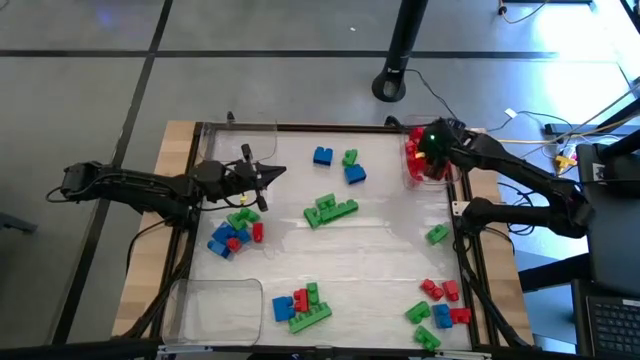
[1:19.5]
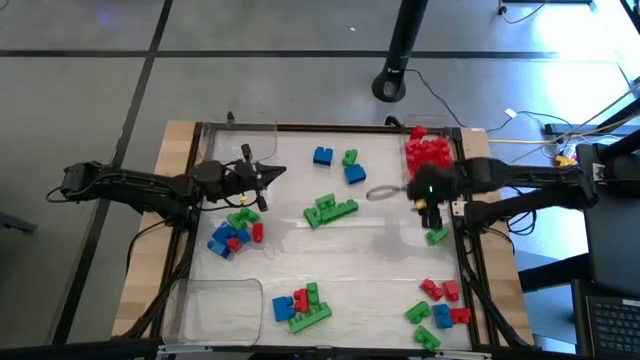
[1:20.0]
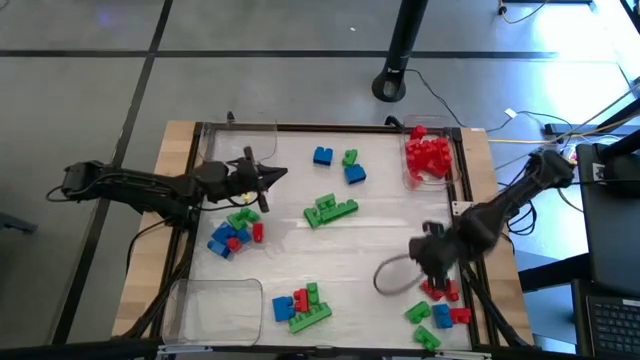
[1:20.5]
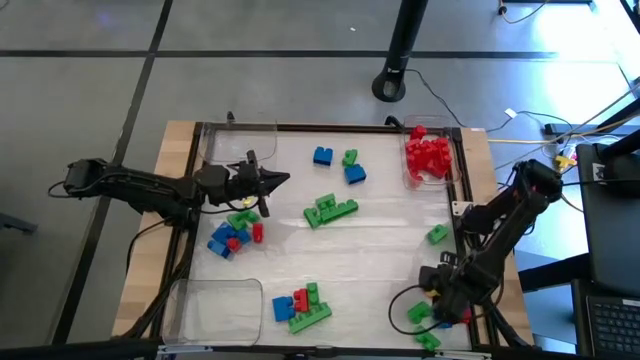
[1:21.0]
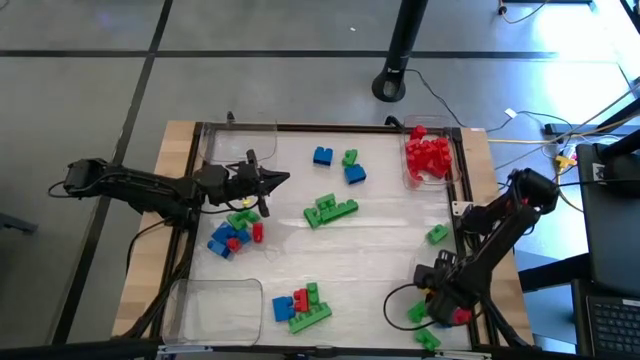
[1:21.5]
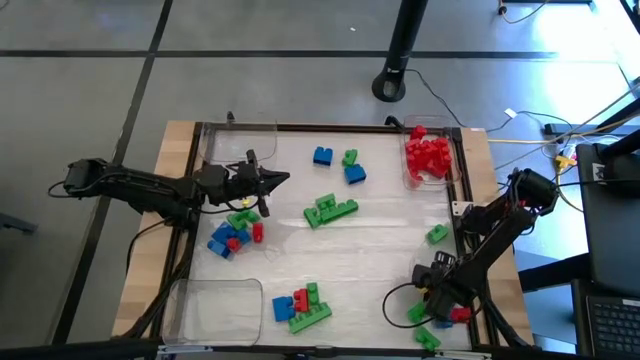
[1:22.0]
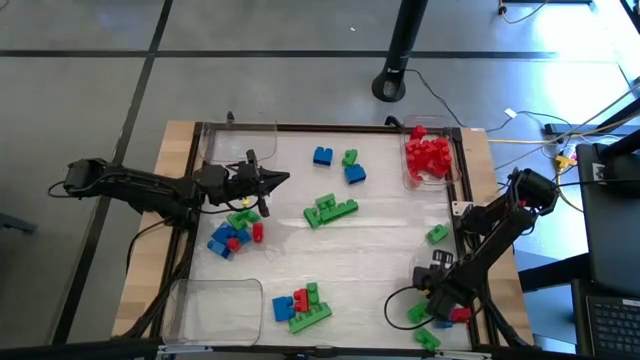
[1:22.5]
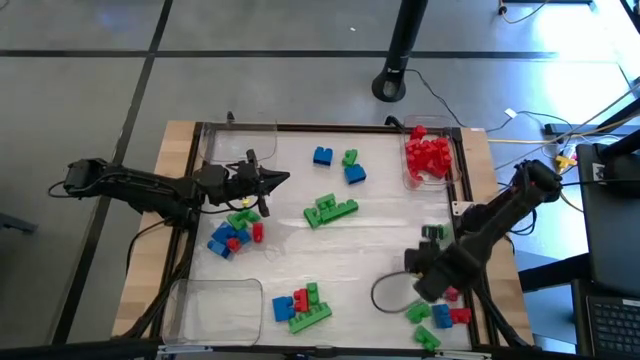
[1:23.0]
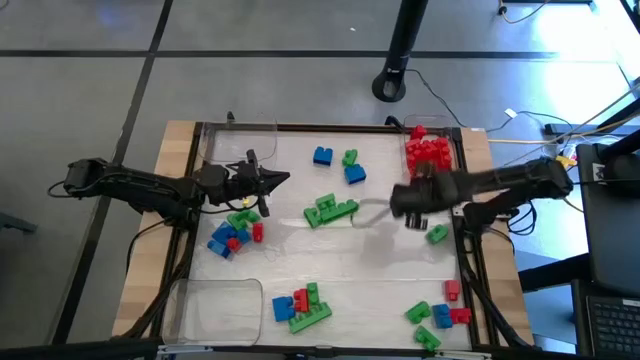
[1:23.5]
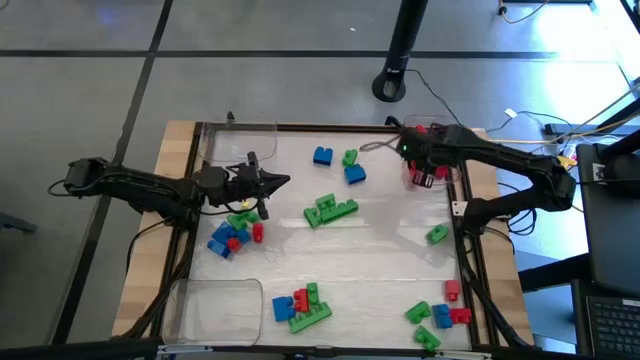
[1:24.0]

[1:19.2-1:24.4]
Task: Sort blocks
Put the red game piece into the right transparent bin

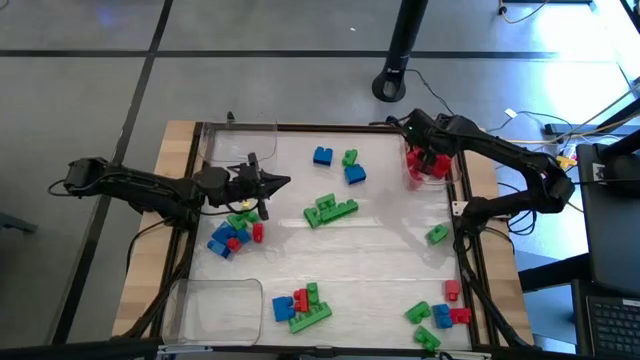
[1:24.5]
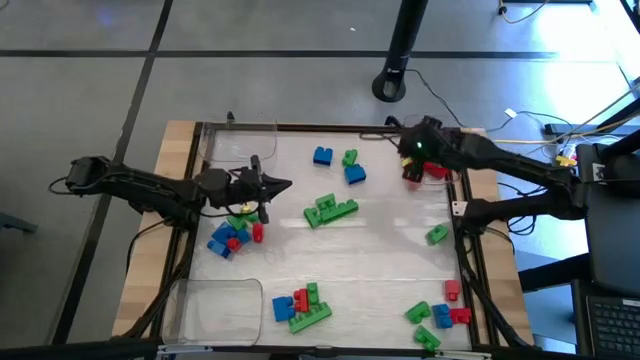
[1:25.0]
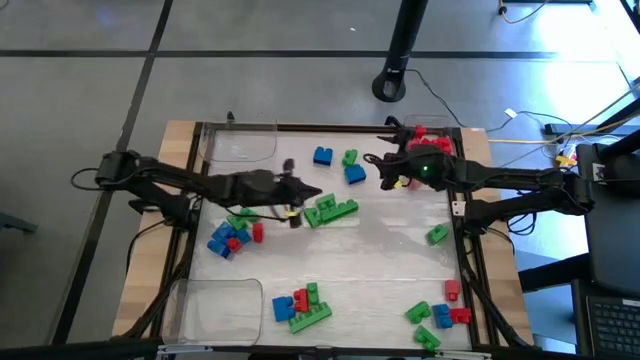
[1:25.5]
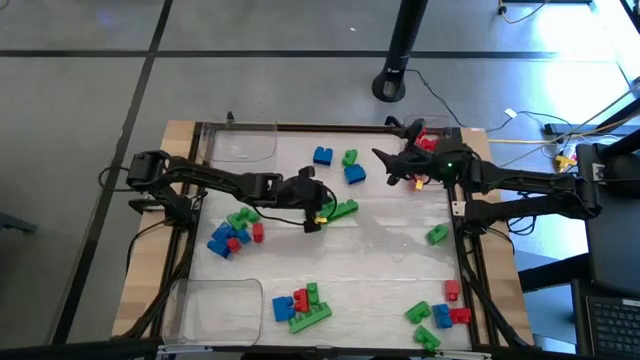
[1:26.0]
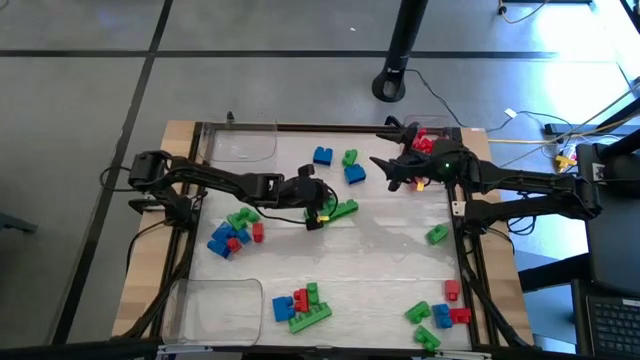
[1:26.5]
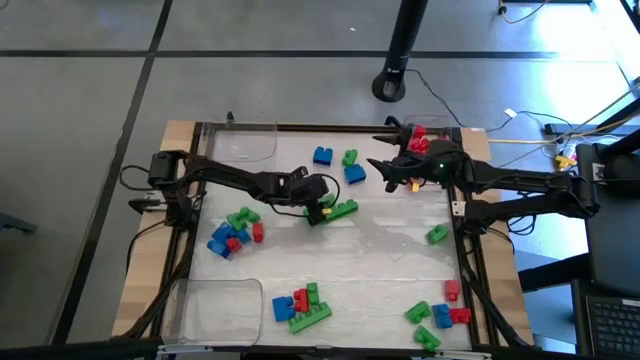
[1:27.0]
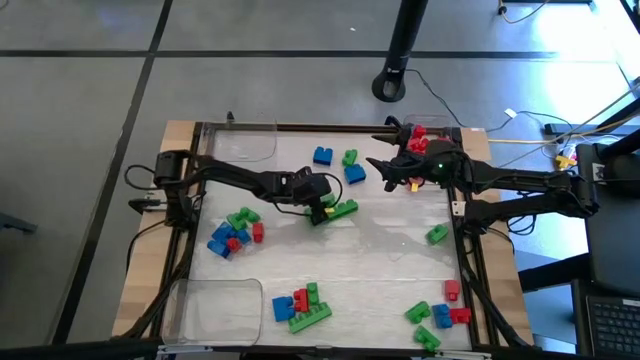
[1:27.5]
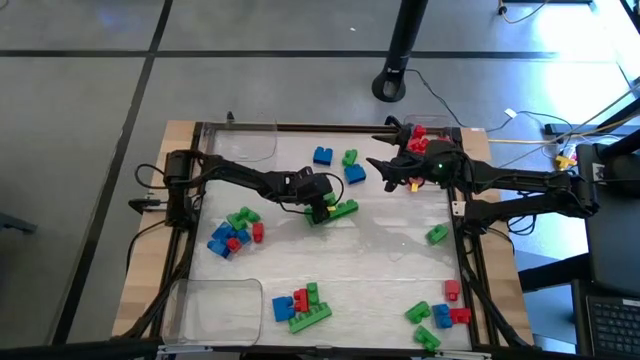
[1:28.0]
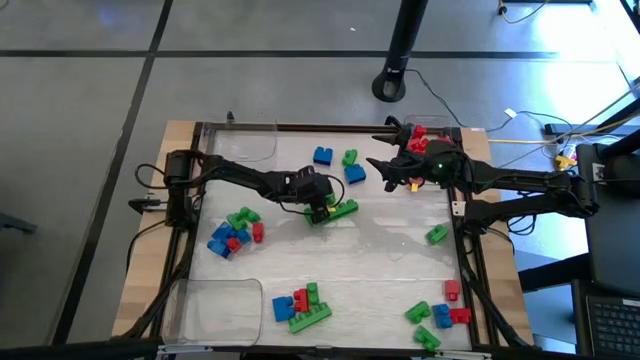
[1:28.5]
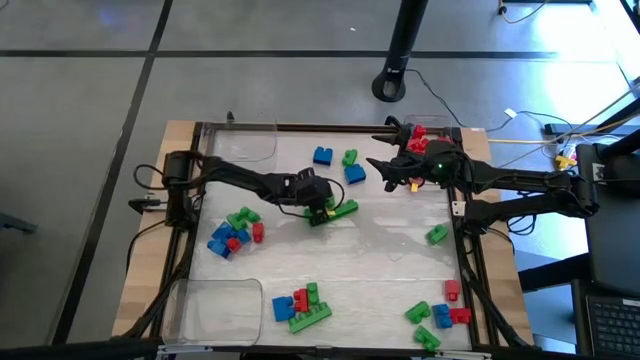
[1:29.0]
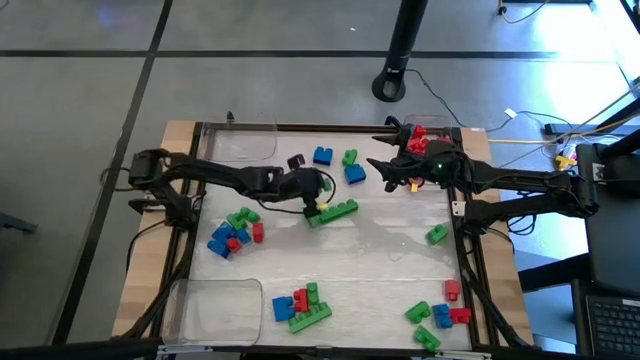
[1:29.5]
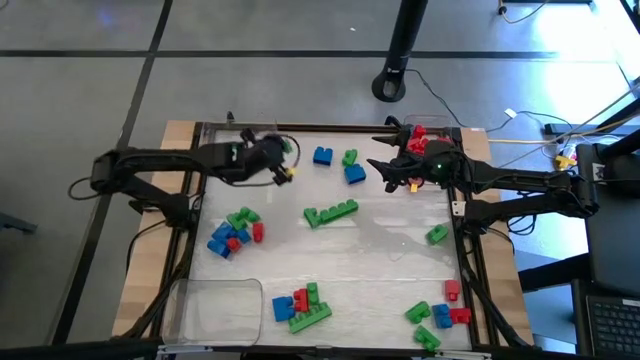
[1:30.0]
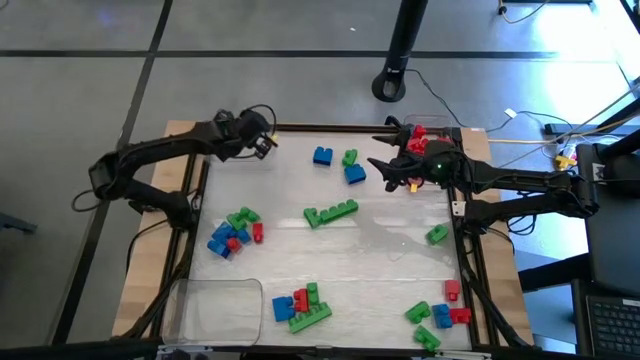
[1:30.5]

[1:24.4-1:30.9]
Put the green game piece into the left transparent bin

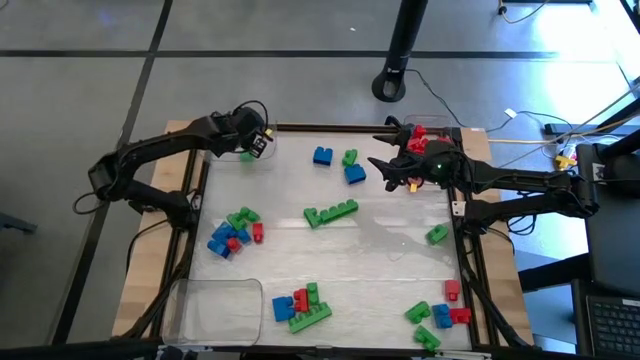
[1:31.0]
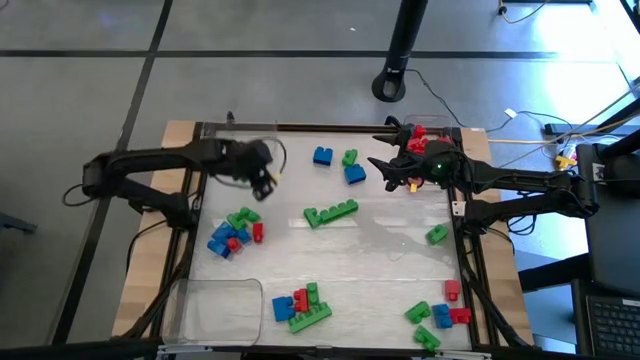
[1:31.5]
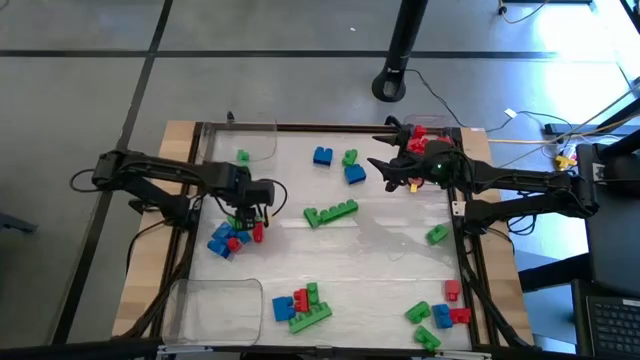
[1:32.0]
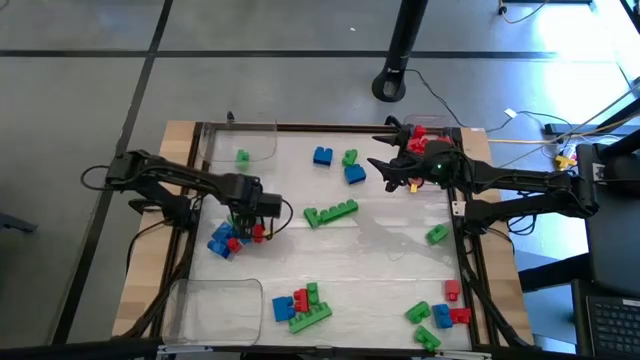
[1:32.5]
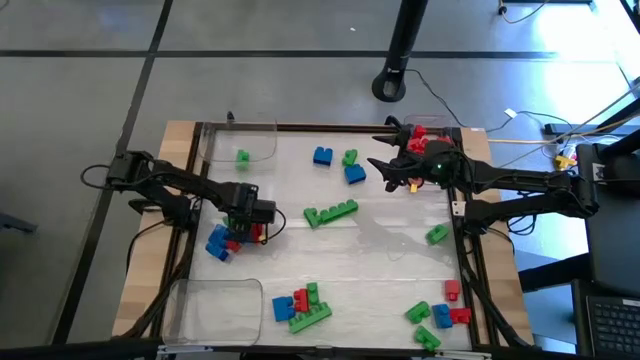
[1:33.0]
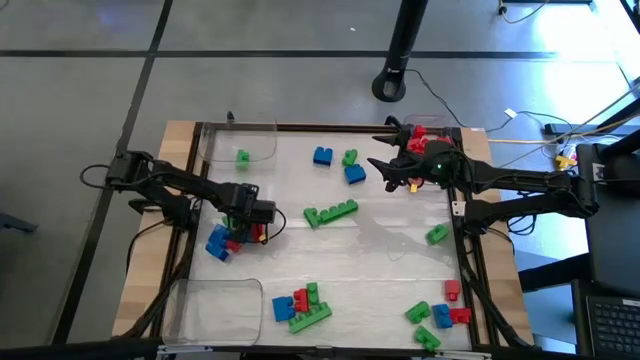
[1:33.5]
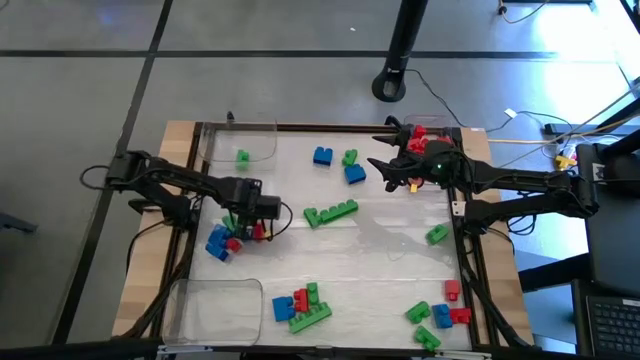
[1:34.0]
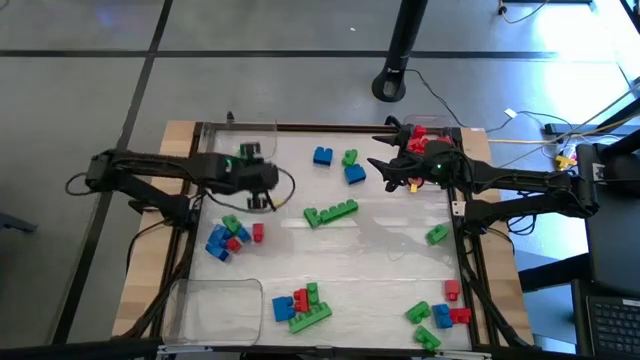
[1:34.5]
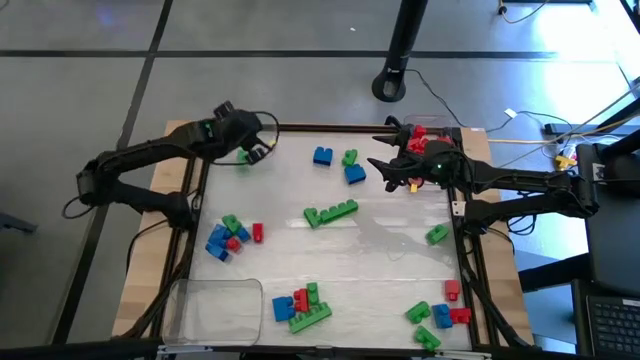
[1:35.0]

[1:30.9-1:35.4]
Put the green game piece into the left transparent bin

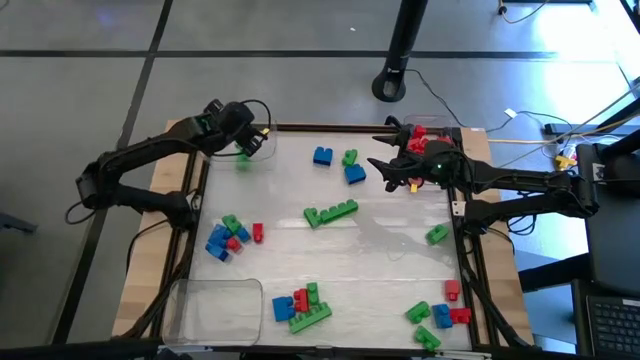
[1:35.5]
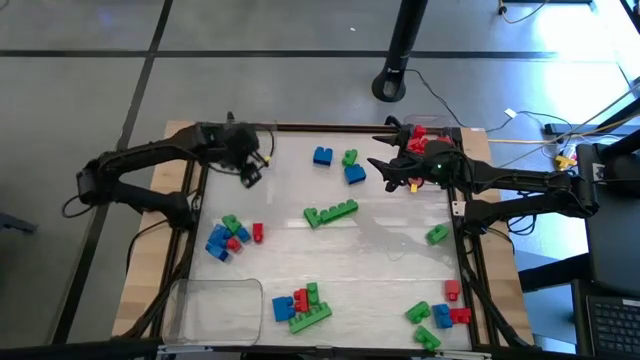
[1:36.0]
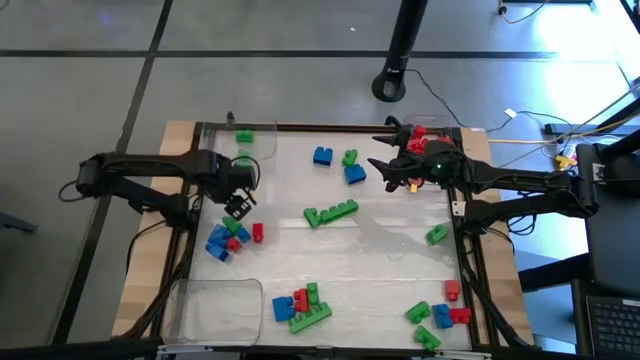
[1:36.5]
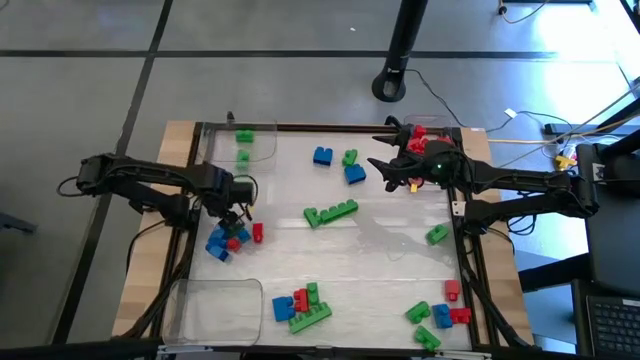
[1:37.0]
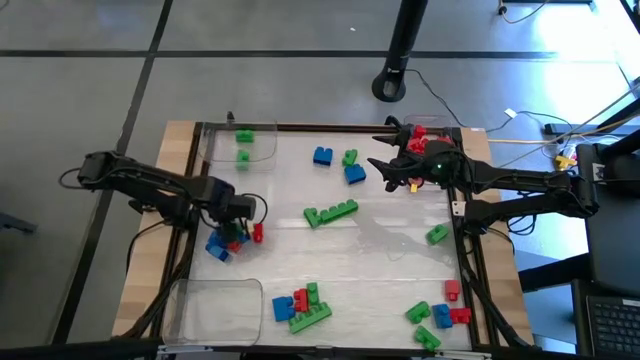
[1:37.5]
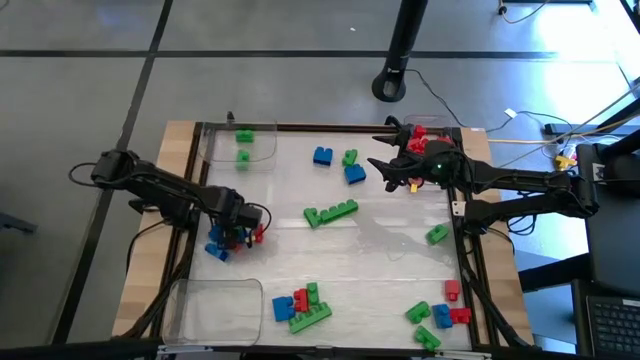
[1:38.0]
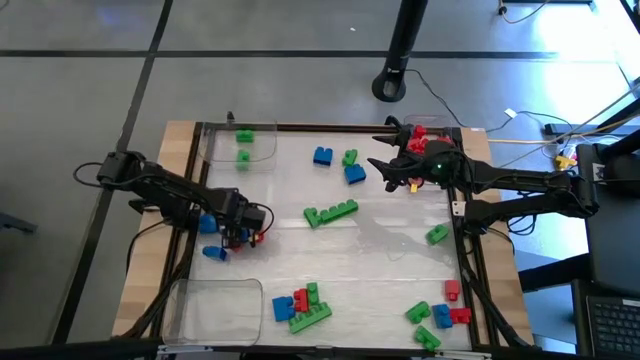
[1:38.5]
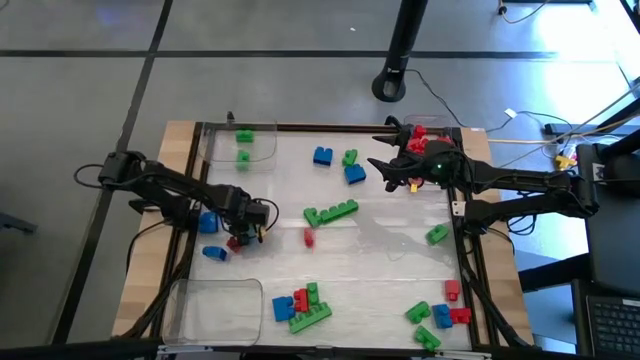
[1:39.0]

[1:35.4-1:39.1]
Put the green game piece into the left transparent bin

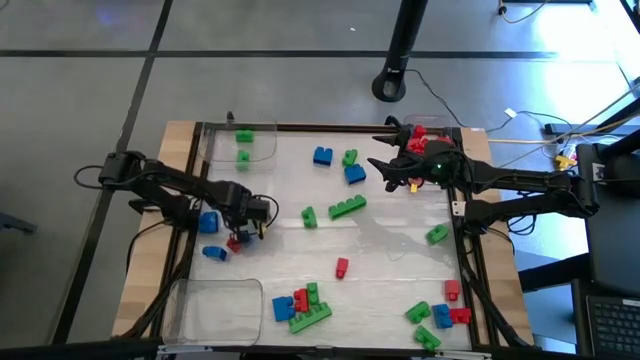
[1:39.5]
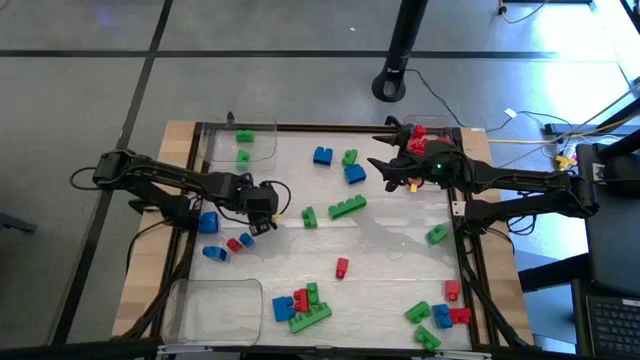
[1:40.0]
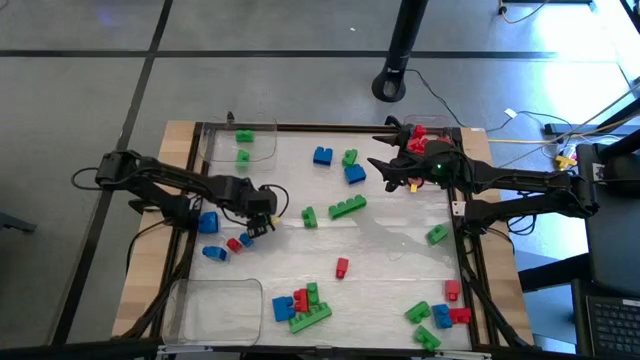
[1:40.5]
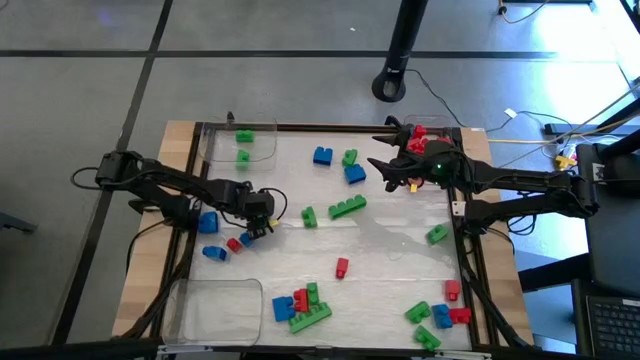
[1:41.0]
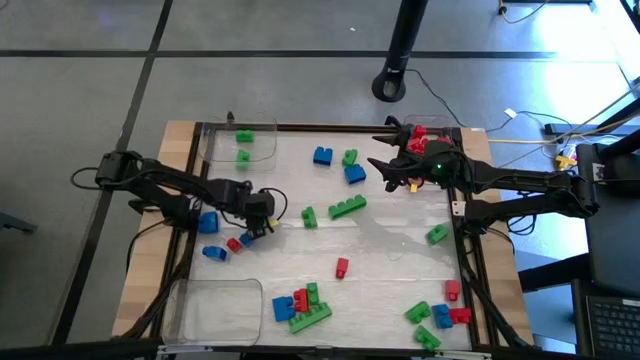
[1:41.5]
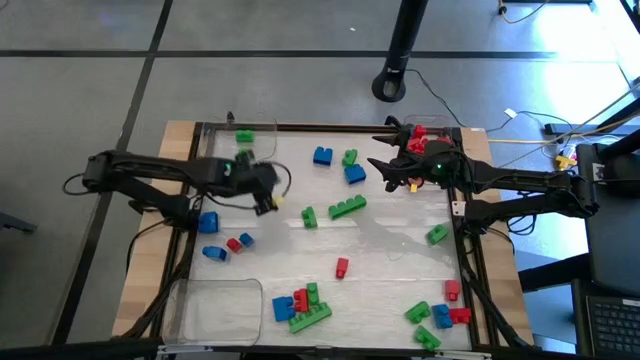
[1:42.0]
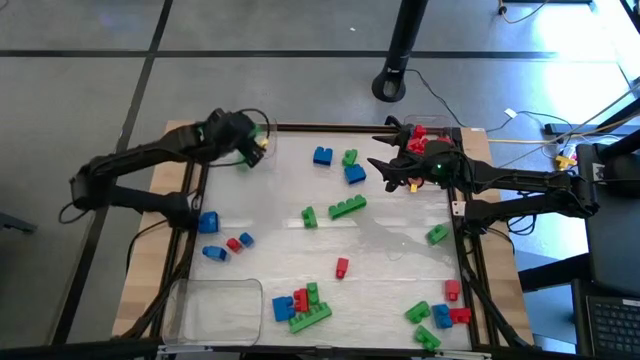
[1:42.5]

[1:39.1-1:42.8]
Put the green game piece into the left transparent bin
